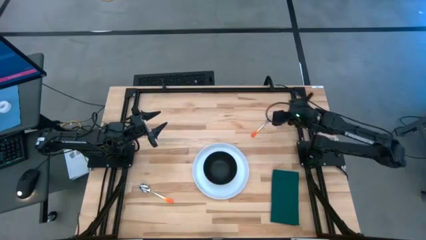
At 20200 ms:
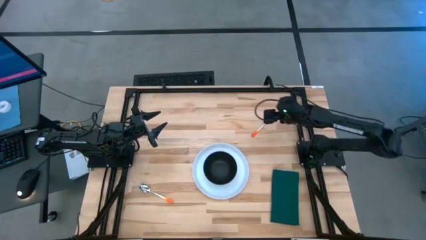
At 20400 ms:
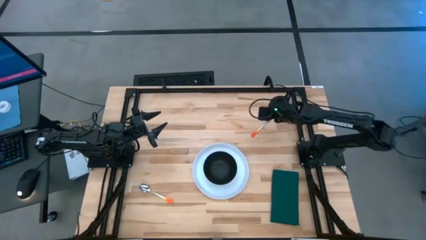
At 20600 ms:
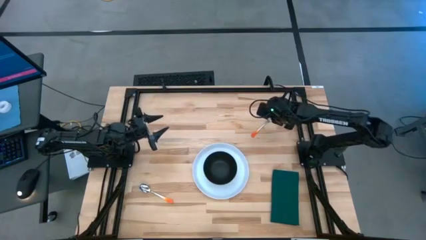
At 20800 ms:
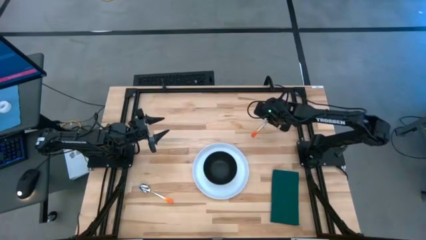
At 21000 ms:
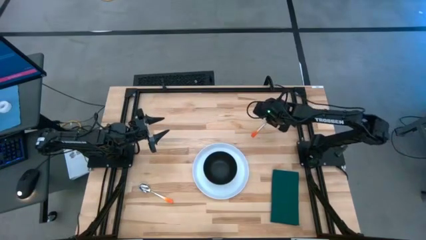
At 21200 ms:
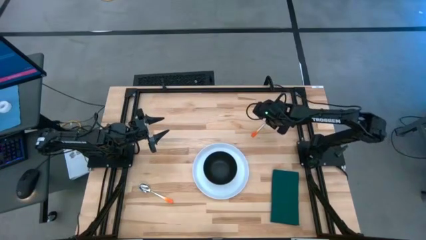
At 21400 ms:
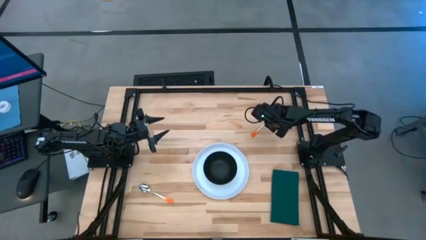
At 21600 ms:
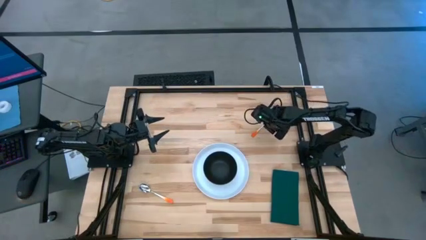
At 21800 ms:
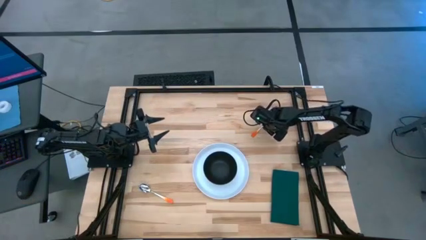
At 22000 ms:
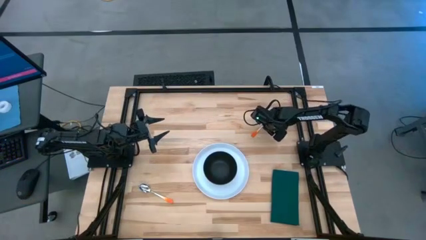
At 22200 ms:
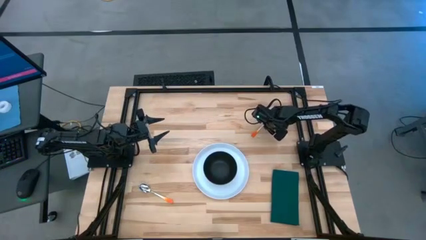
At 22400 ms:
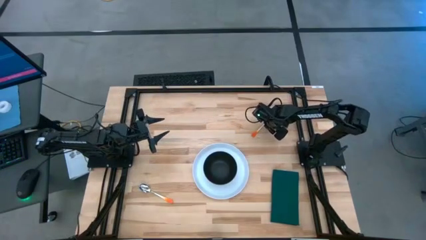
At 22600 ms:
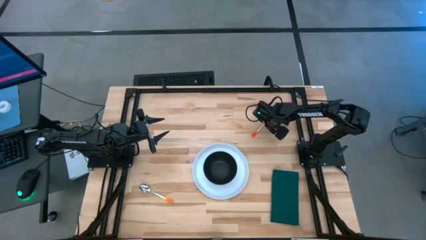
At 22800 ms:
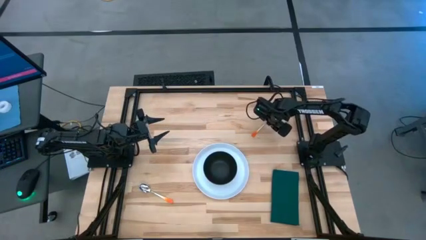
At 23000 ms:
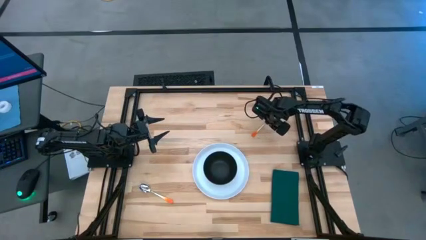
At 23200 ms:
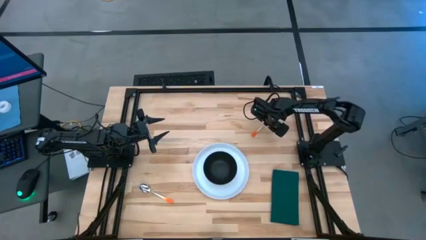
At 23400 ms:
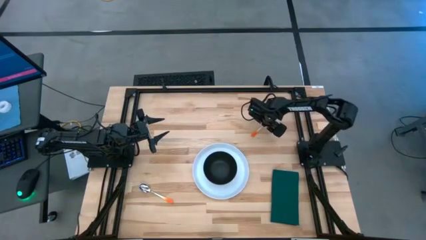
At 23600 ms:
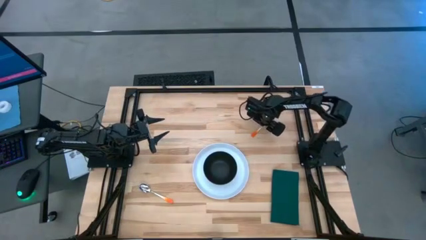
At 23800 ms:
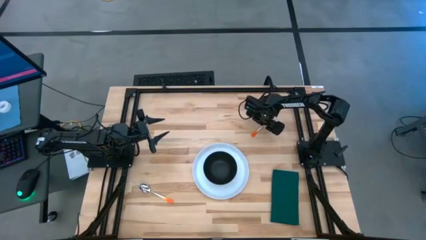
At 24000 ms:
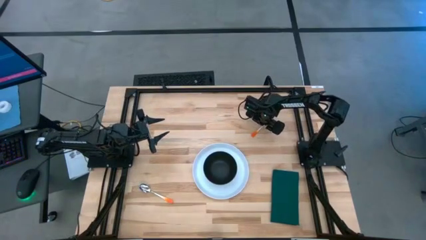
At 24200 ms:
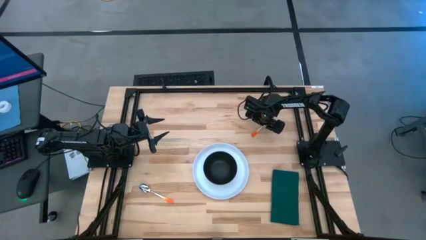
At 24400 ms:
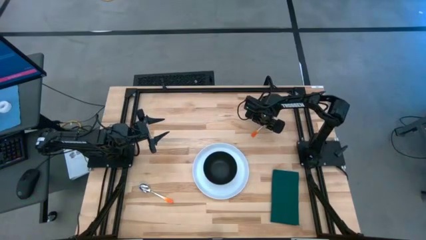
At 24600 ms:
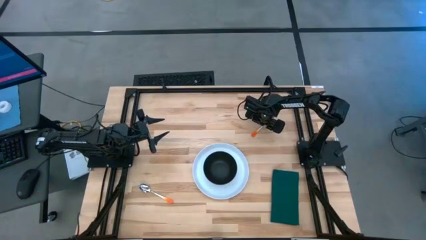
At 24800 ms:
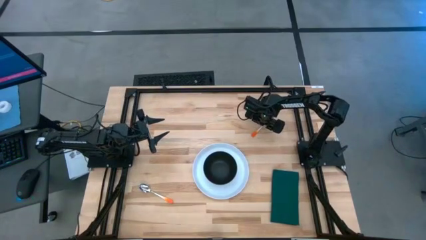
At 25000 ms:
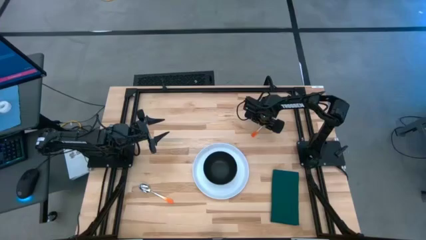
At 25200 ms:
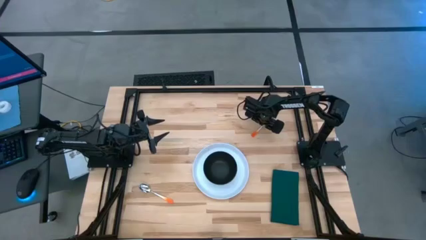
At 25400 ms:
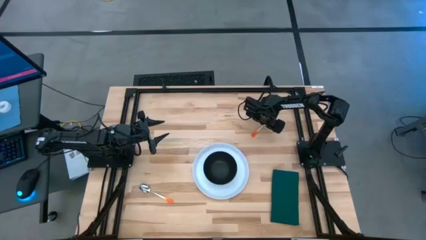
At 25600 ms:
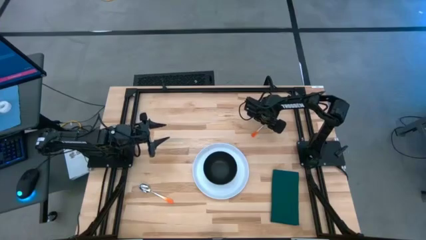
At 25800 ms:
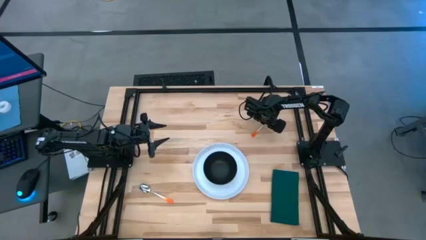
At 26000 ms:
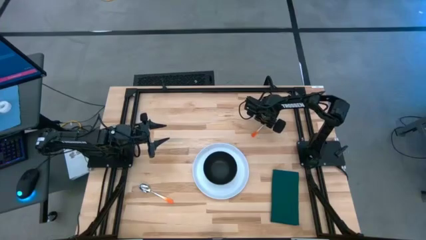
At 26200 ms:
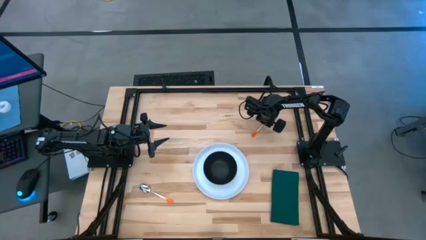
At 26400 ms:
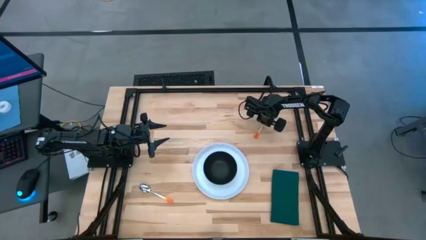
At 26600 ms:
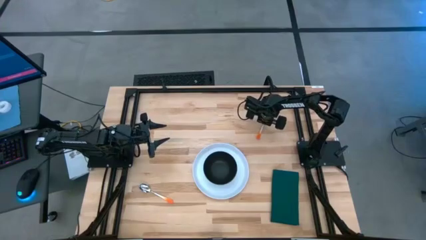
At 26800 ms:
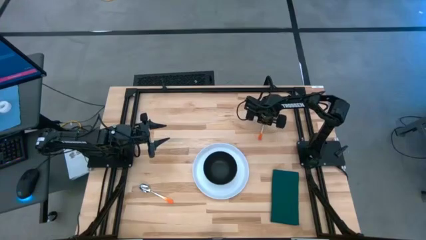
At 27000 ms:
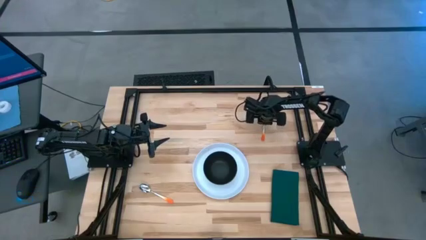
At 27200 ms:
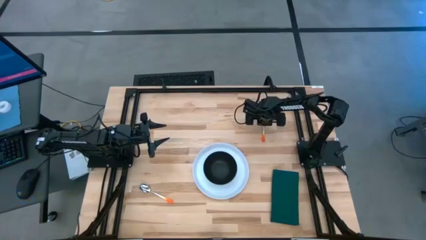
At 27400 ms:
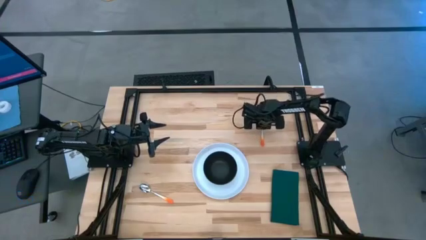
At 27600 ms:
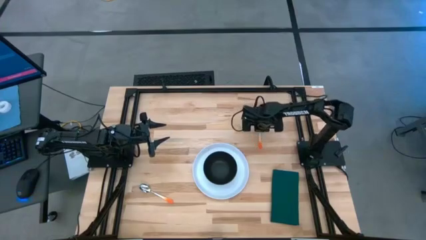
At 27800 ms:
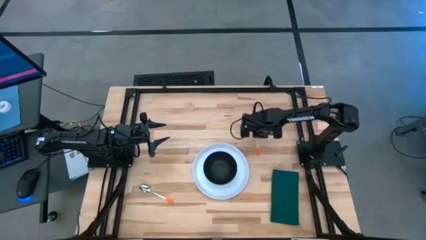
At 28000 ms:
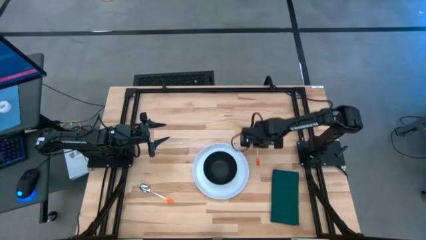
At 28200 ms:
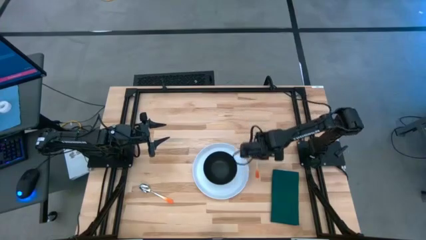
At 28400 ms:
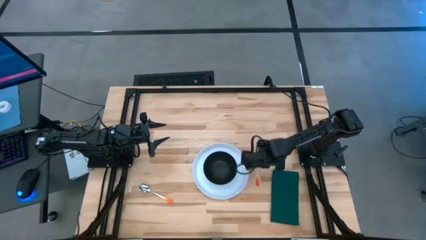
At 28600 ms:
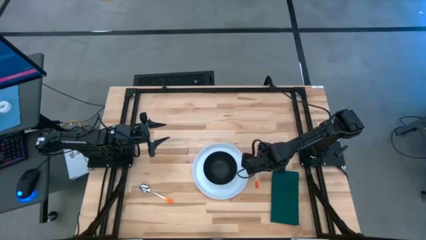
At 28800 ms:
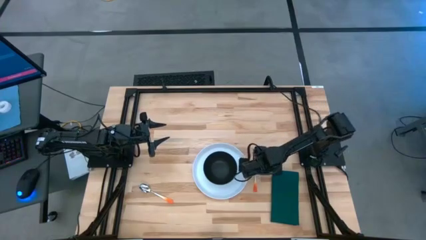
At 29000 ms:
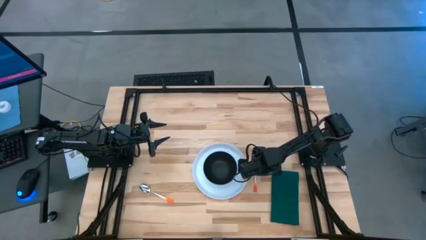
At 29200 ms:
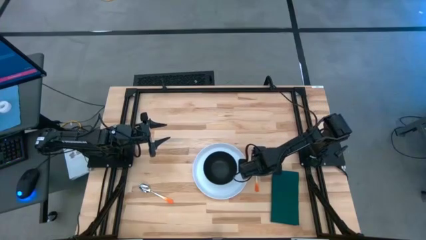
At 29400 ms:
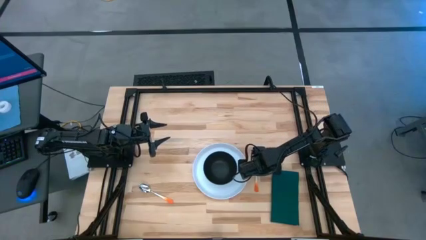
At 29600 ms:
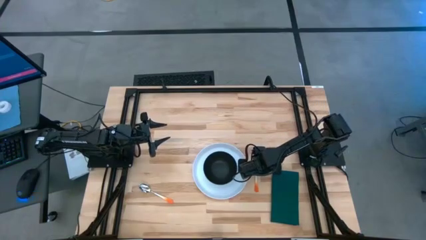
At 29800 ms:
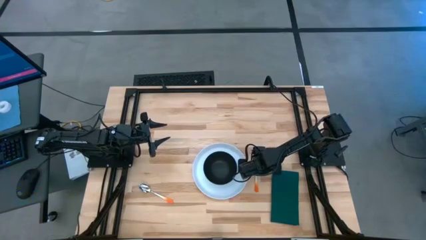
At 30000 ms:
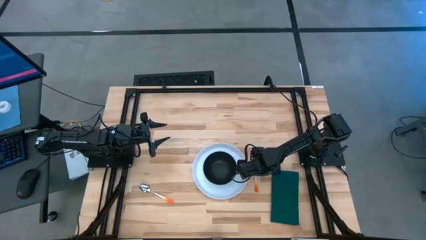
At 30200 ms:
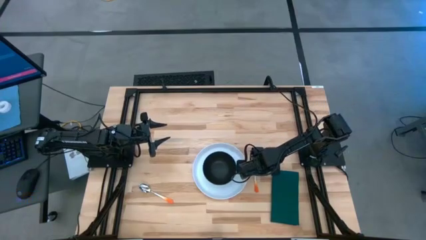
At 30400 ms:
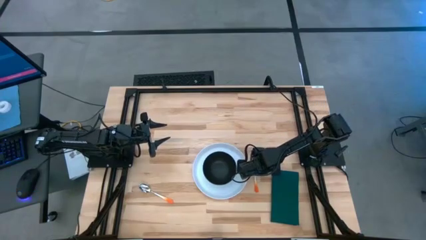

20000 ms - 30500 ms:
Task: Set table place
Place the orange-handled fork next to the white plate
